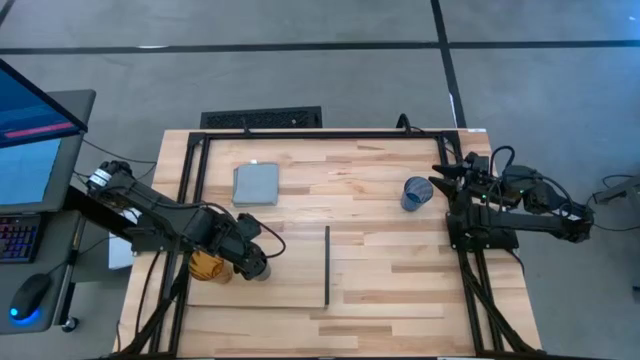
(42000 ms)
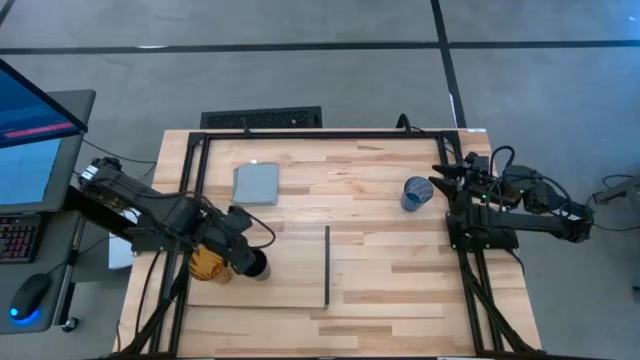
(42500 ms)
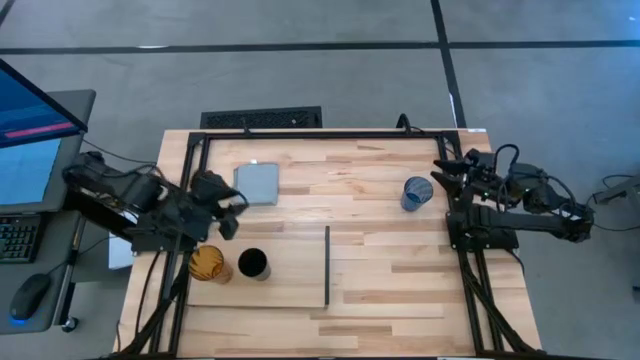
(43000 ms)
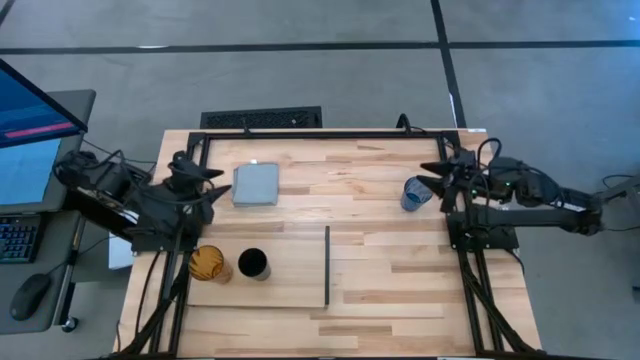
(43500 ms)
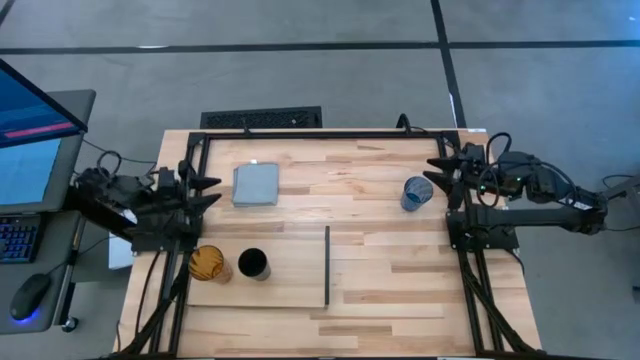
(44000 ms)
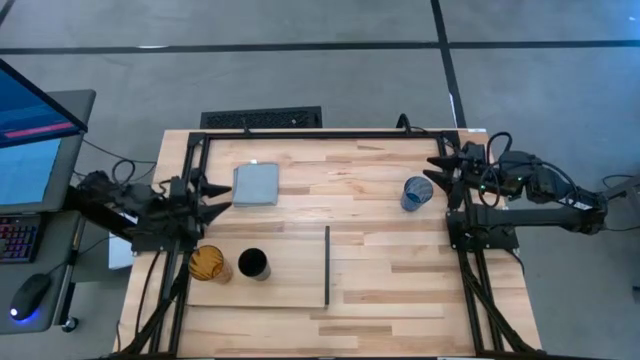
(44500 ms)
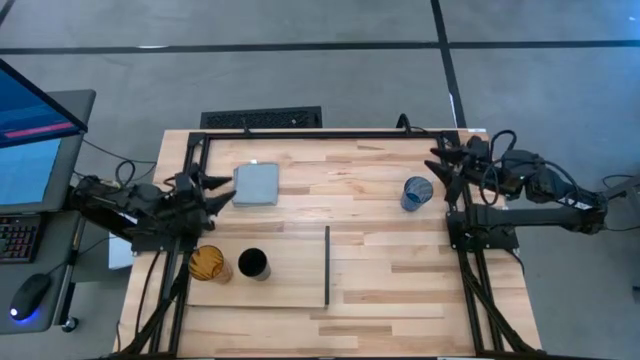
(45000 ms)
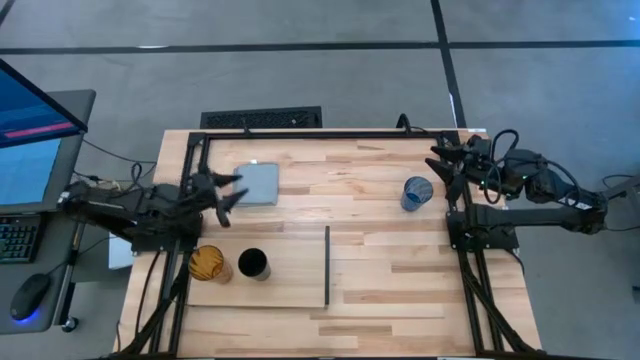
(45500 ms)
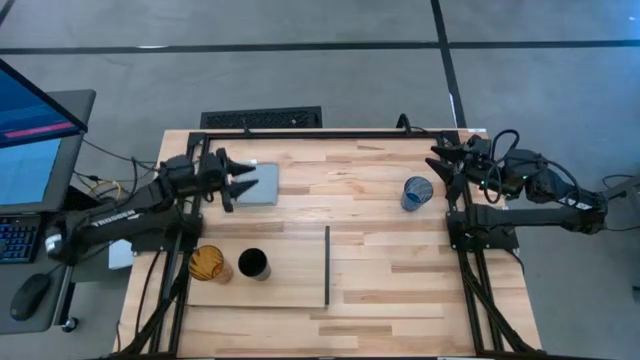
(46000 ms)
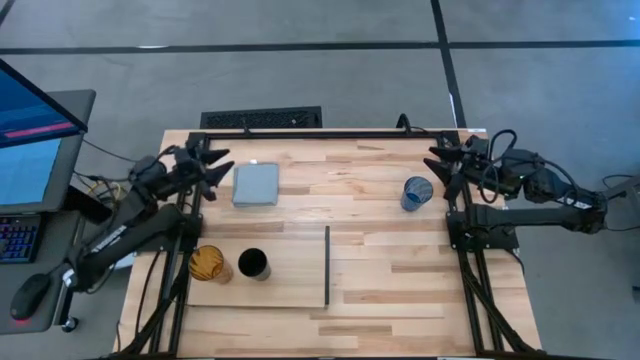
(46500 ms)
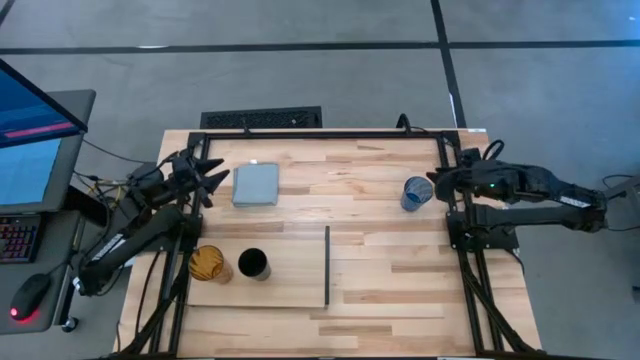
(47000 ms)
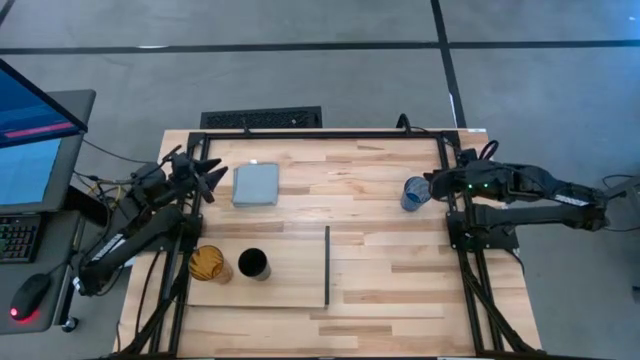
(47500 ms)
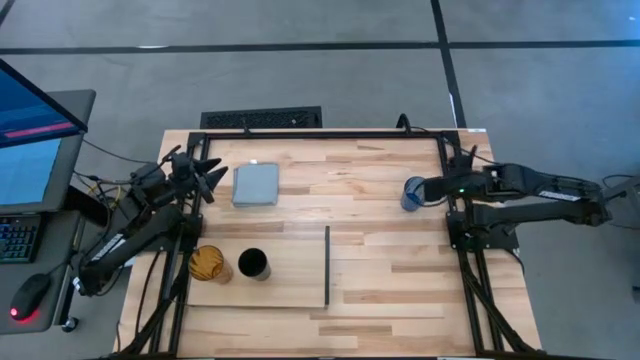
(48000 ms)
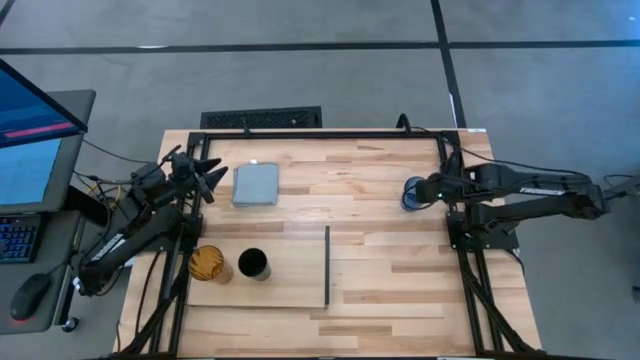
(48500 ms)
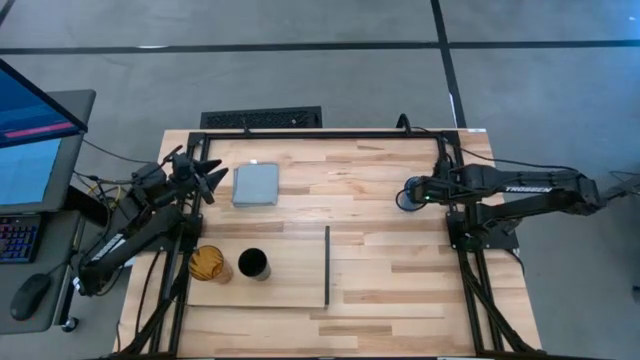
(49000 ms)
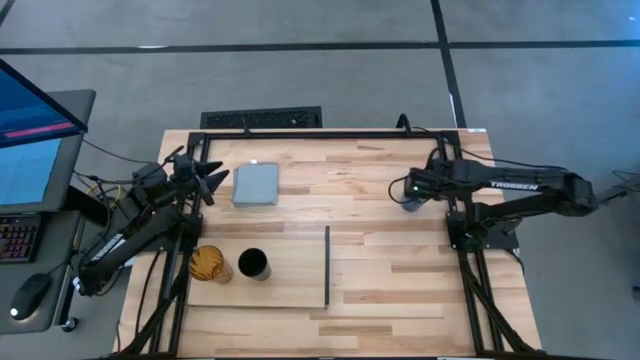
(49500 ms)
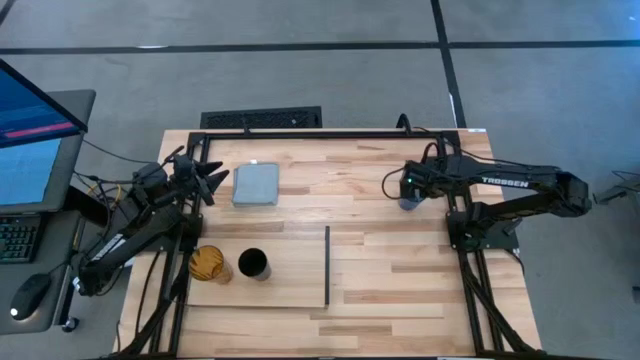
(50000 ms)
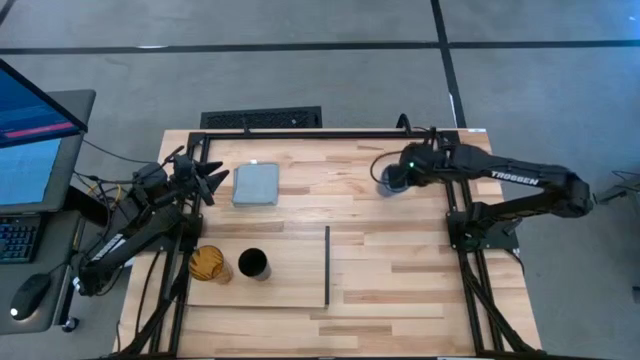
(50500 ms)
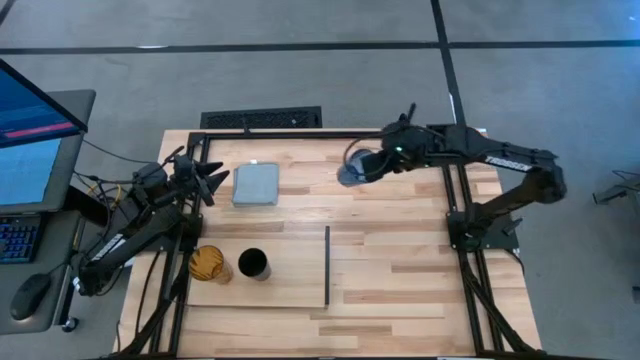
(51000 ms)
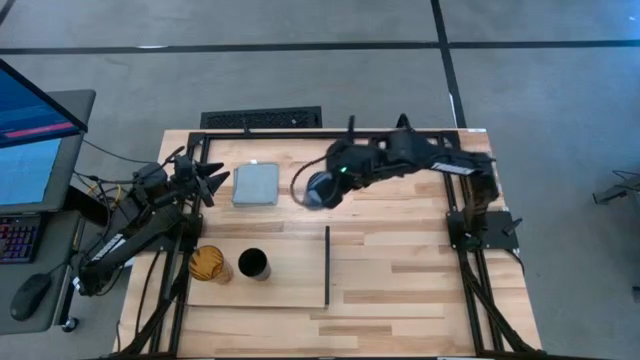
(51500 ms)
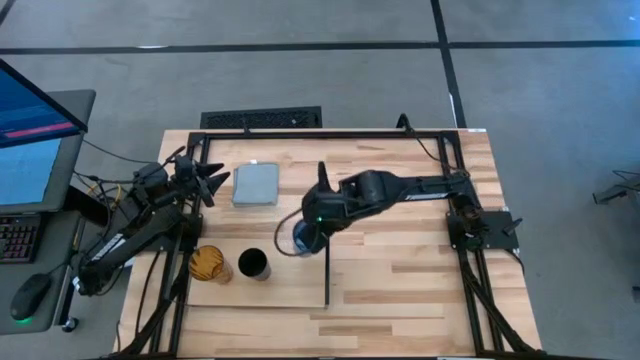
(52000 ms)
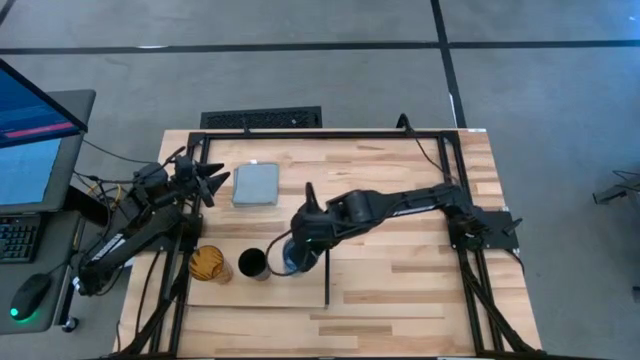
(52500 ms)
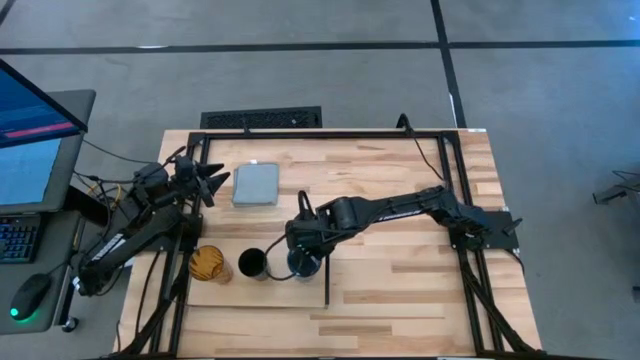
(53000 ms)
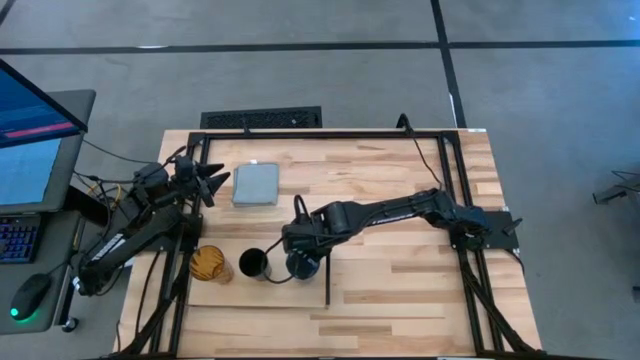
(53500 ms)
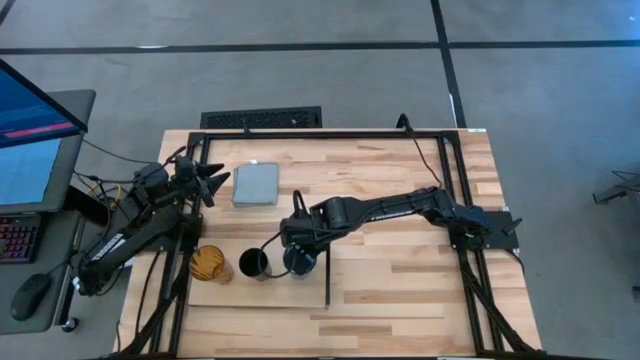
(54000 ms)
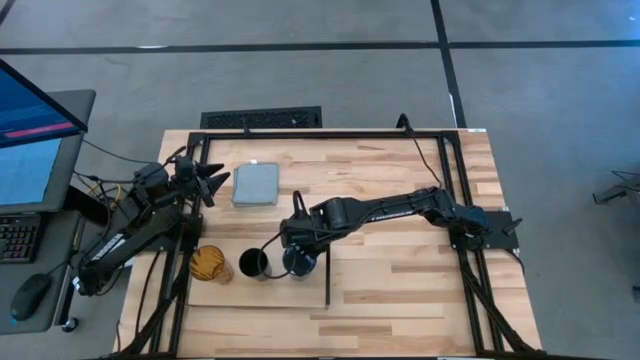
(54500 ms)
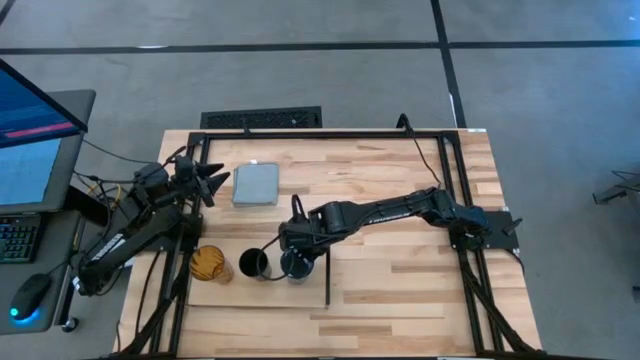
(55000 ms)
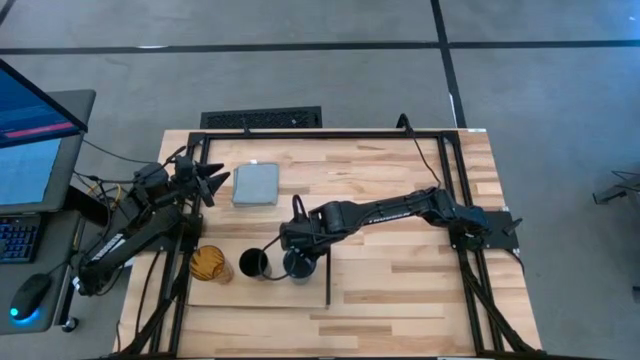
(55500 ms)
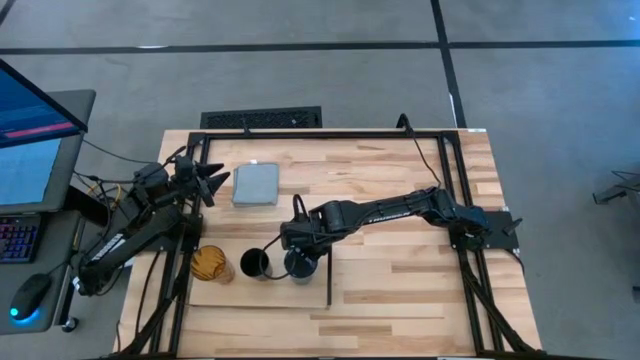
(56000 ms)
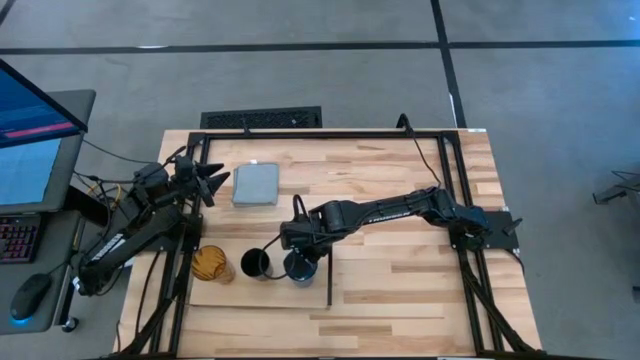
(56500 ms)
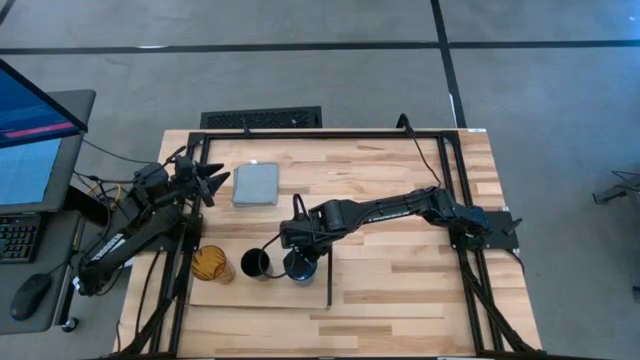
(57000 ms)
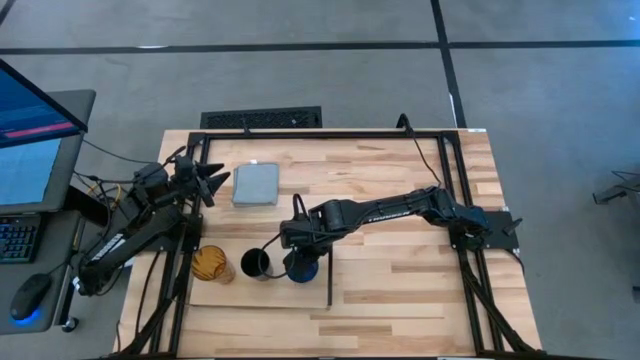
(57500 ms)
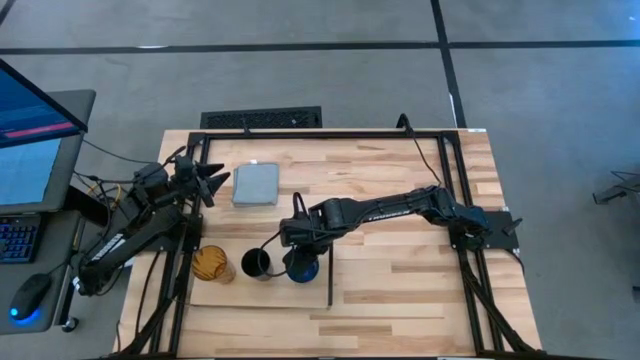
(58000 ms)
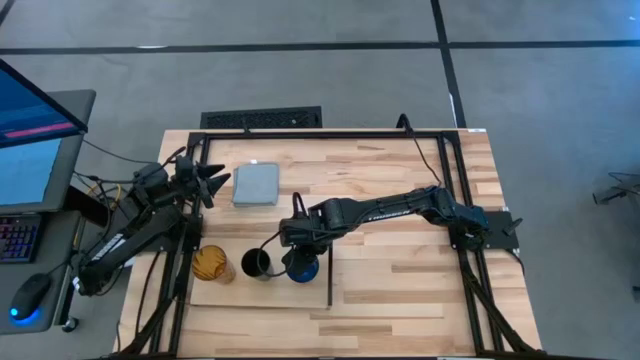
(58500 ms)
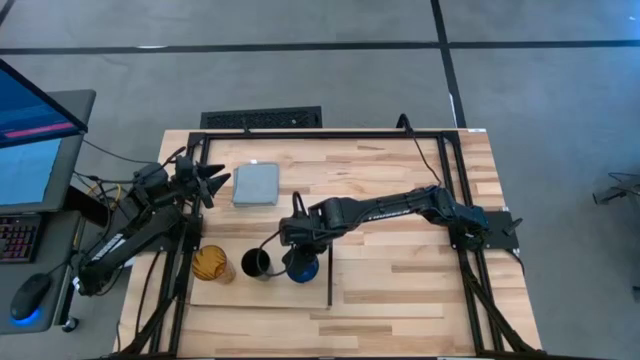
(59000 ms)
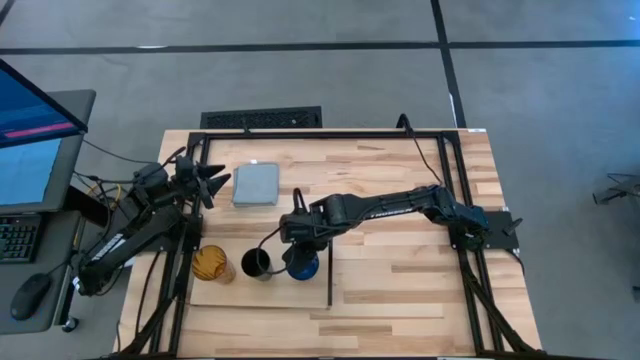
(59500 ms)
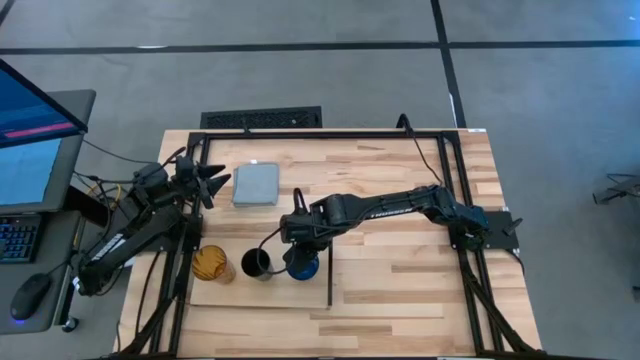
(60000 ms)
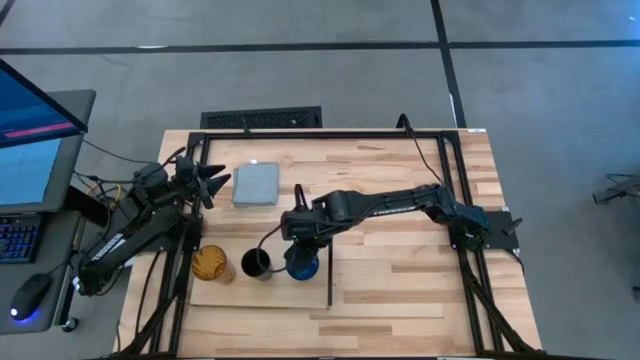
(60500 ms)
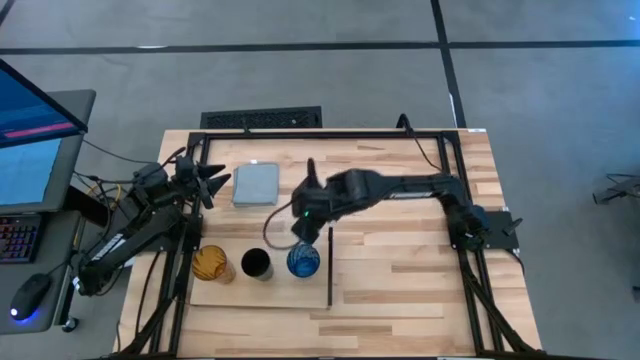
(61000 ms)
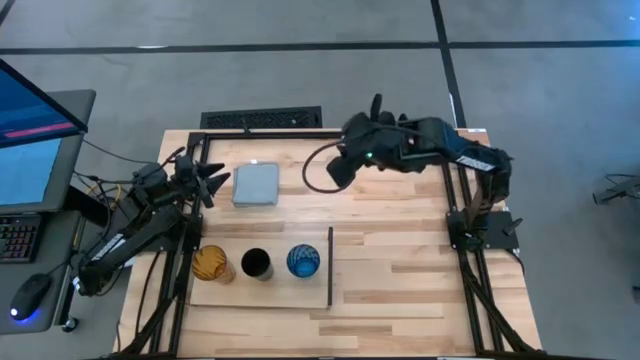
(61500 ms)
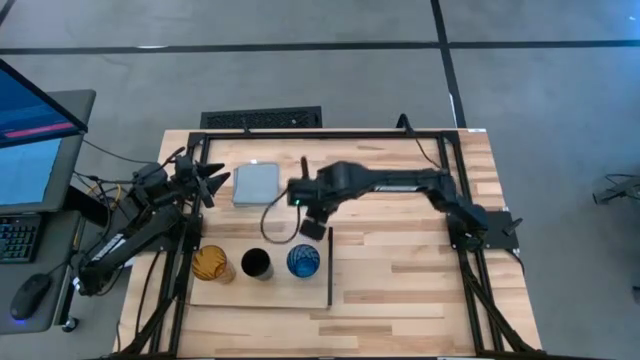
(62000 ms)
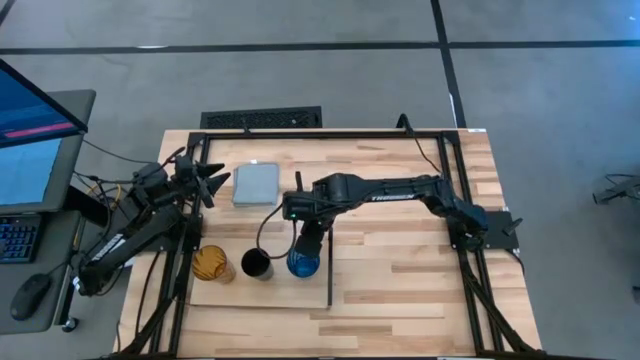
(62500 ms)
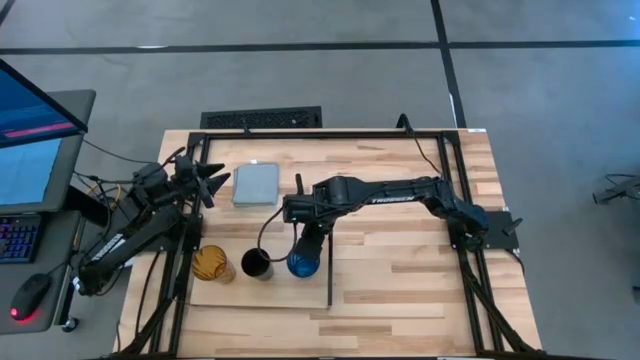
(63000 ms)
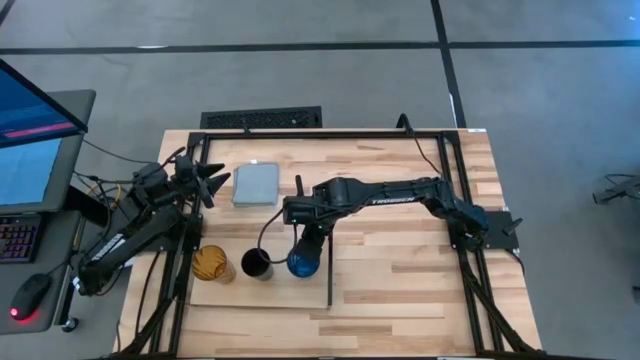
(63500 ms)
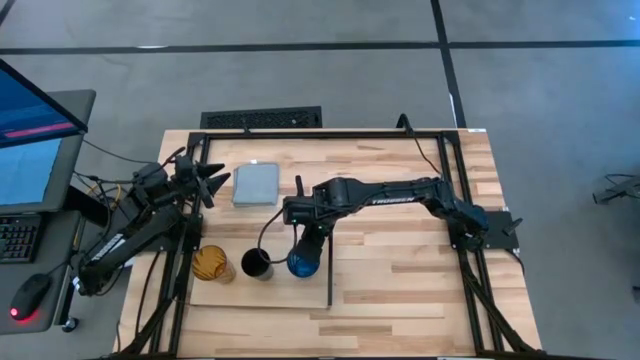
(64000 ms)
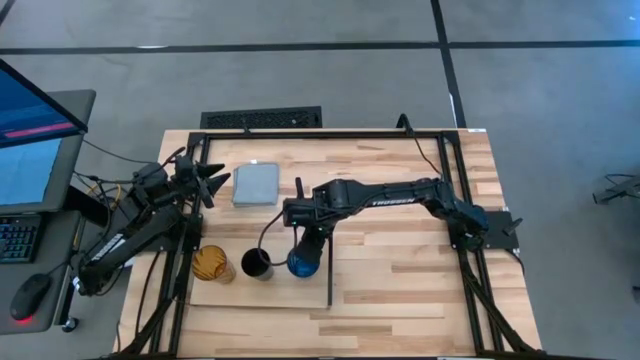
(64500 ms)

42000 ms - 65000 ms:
Task: Stack small to large cups/mugs on shelf
Put the blue cup on the shelf
